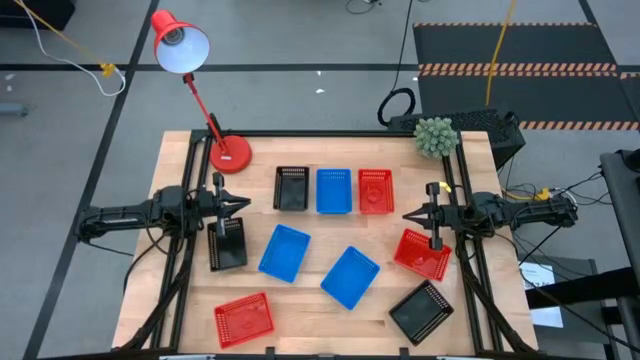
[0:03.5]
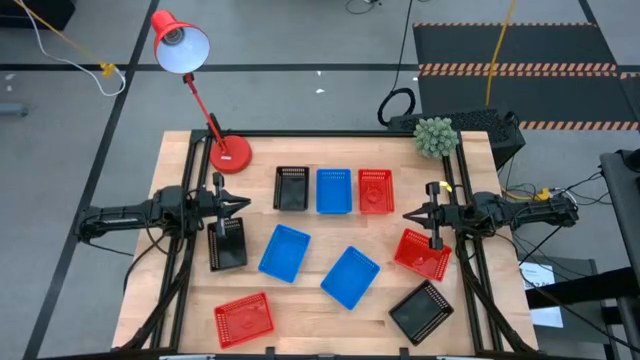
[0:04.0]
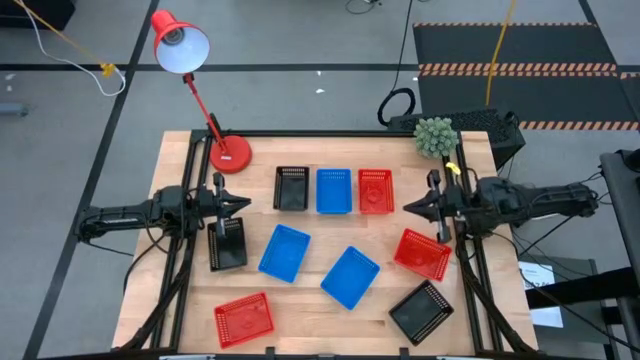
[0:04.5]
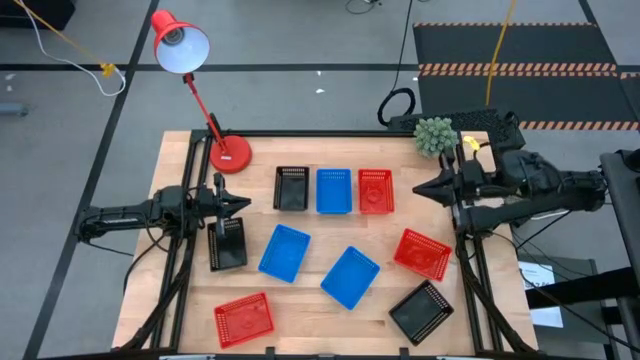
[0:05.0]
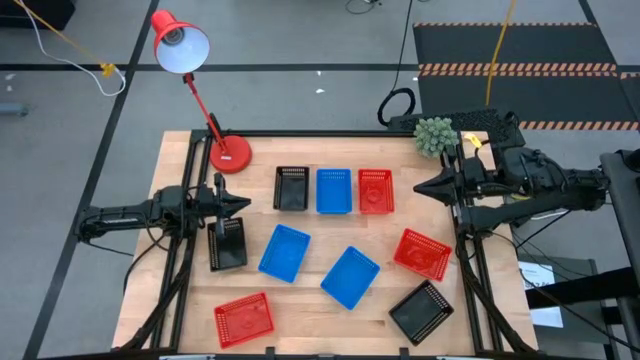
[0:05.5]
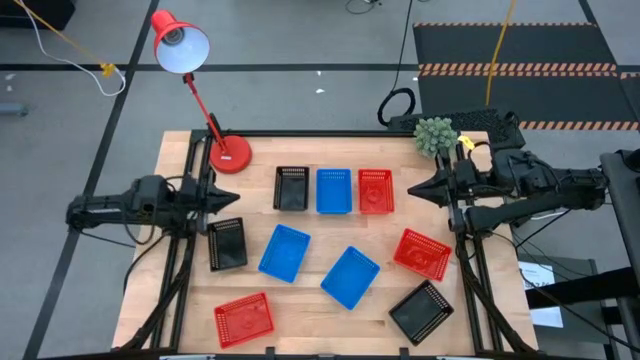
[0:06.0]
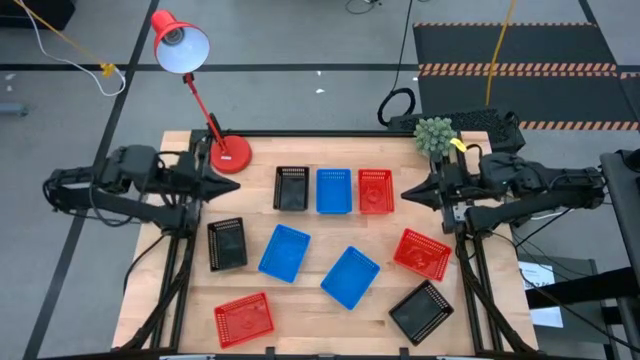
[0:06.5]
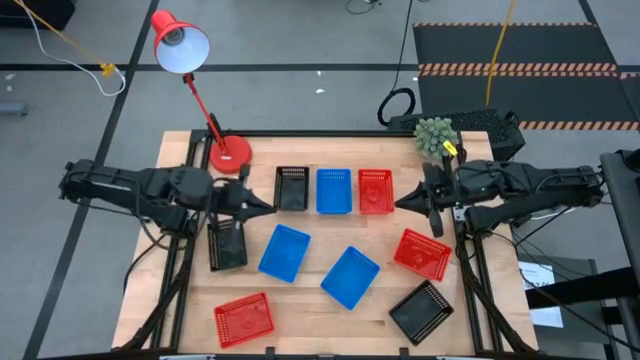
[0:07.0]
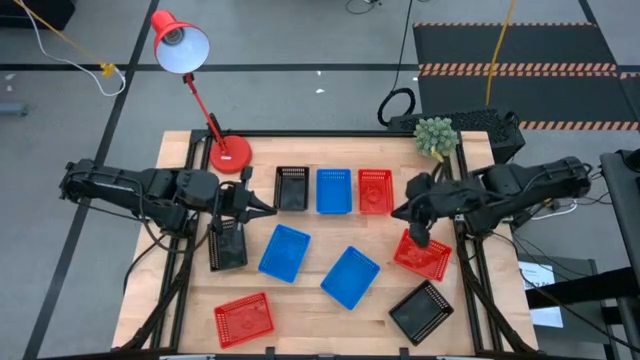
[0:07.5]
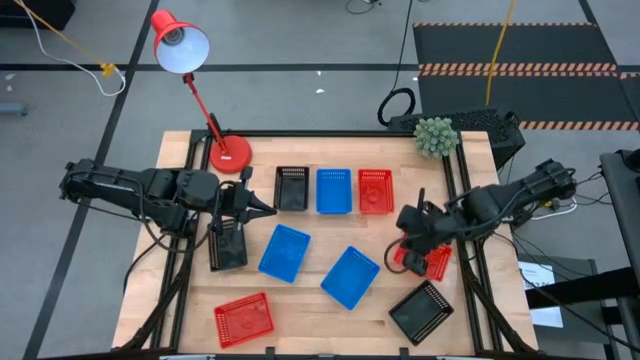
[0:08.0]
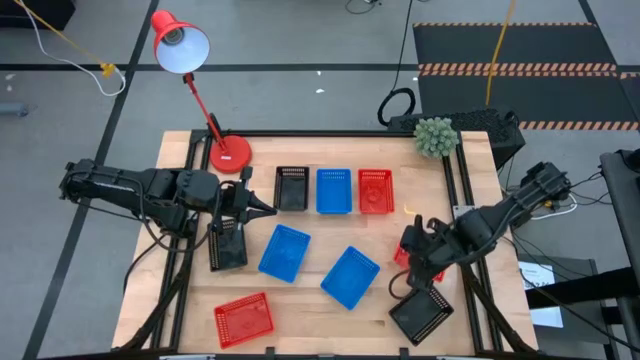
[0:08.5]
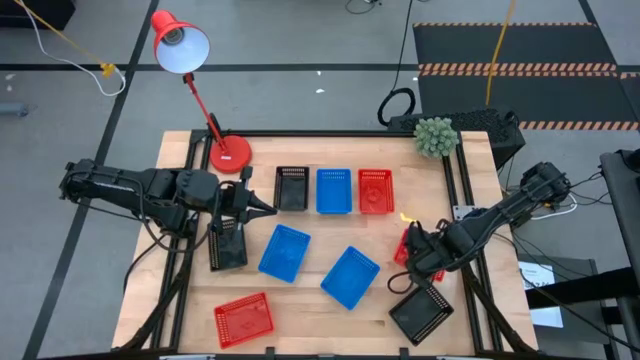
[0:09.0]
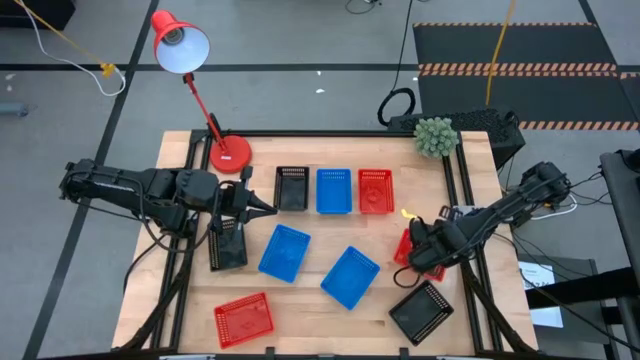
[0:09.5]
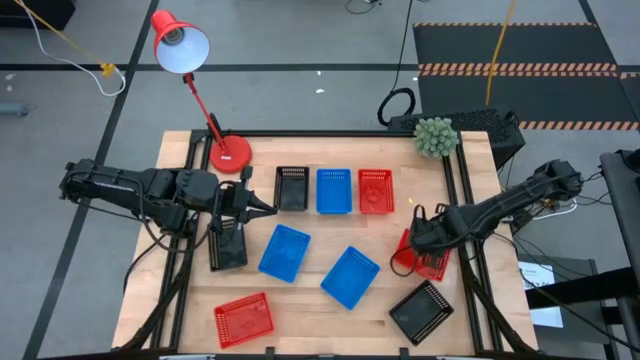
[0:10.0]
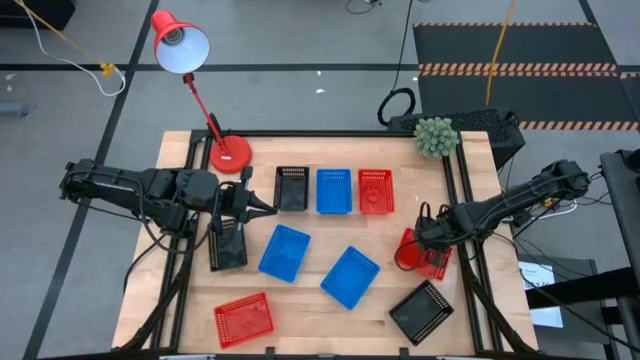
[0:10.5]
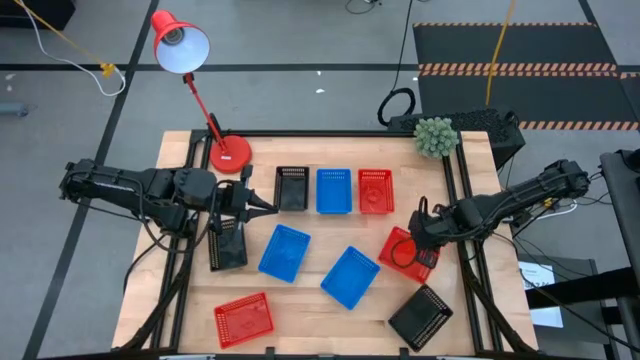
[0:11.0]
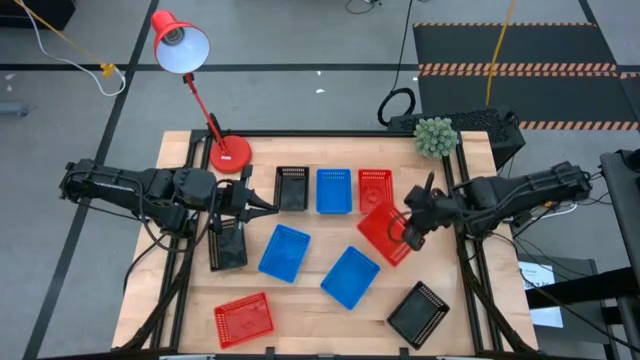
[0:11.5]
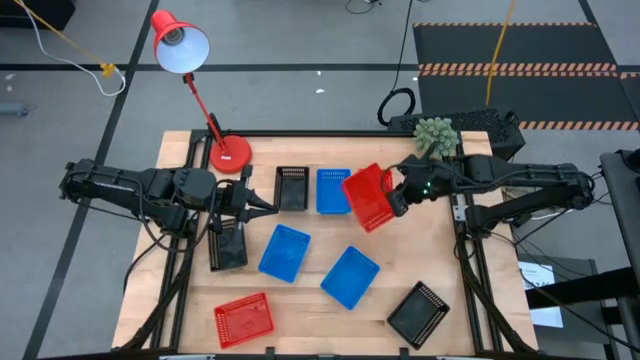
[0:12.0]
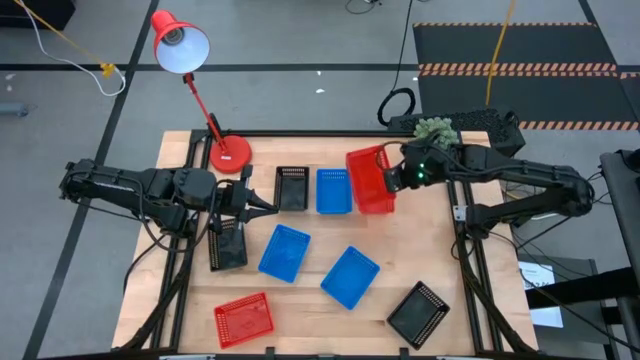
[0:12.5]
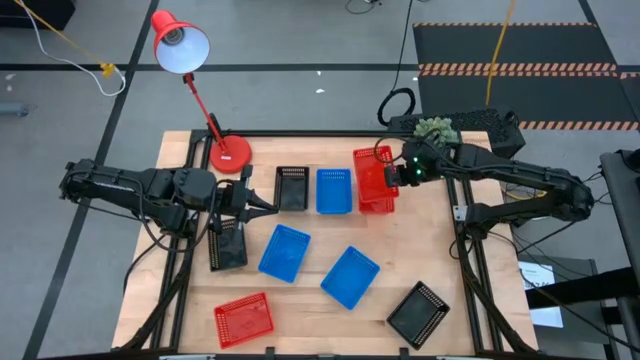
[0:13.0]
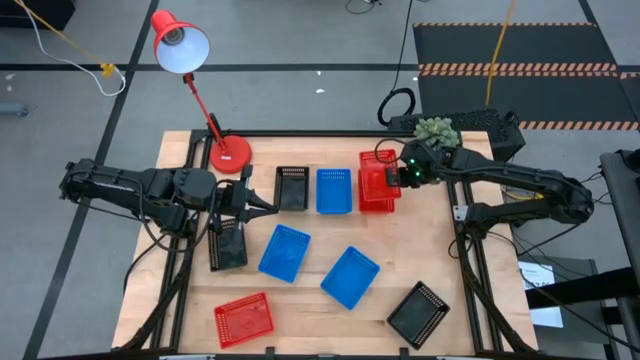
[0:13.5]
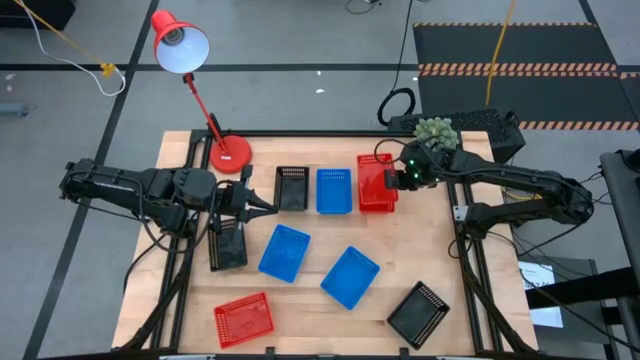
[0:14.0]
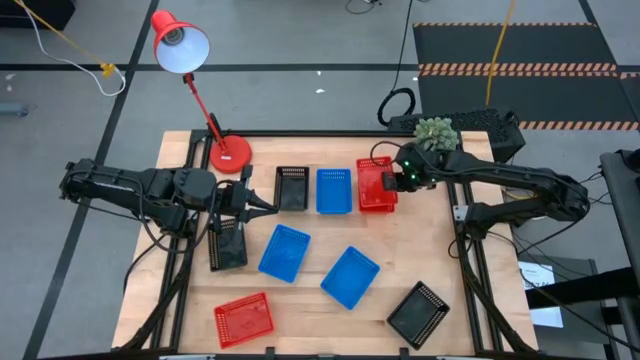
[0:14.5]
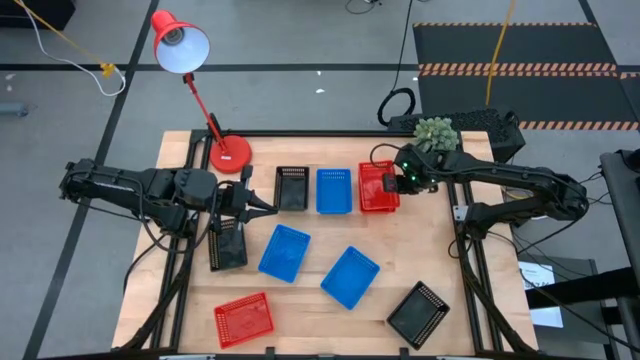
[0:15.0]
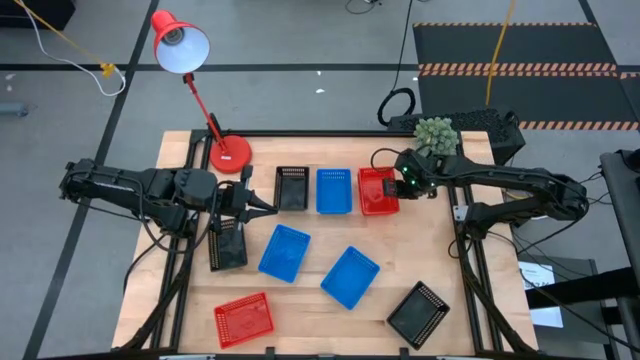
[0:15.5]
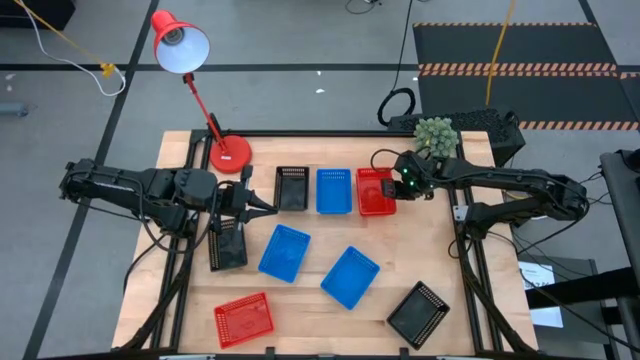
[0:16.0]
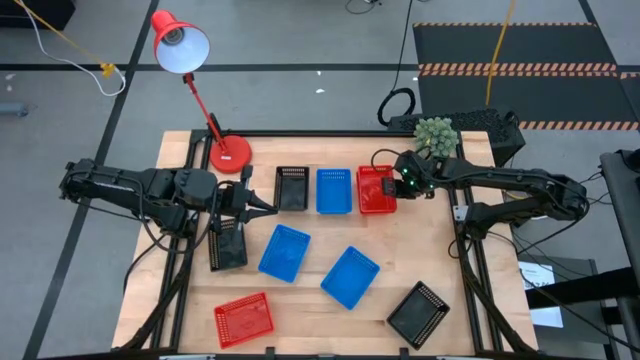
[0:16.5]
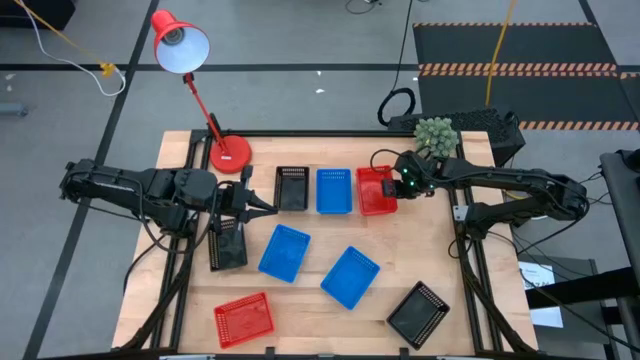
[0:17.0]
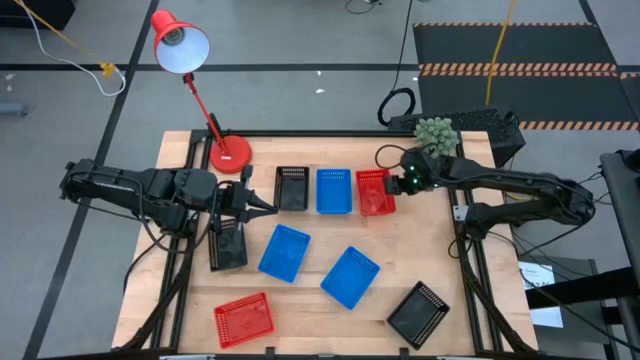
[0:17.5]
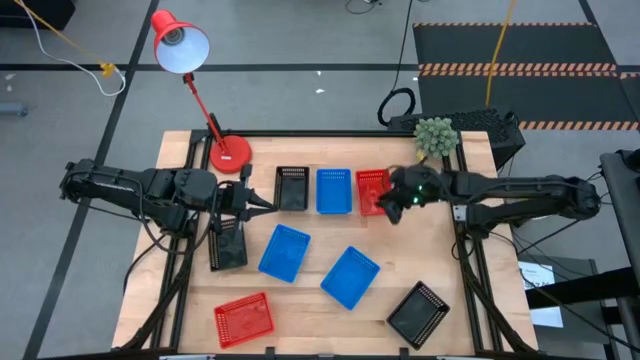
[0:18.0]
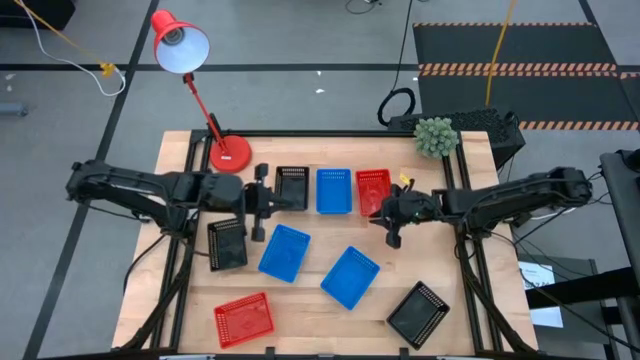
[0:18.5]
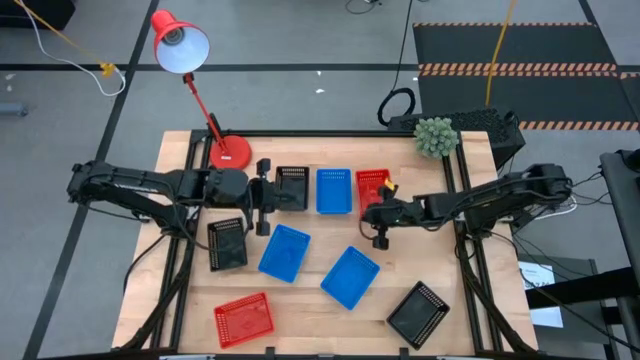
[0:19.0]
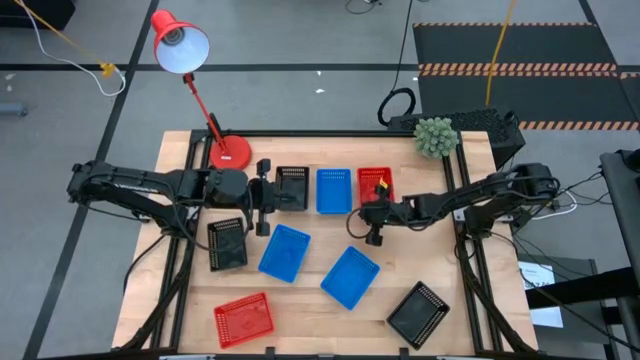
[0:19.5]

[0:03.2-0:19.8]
Stack the middle right red bin on the top red bin

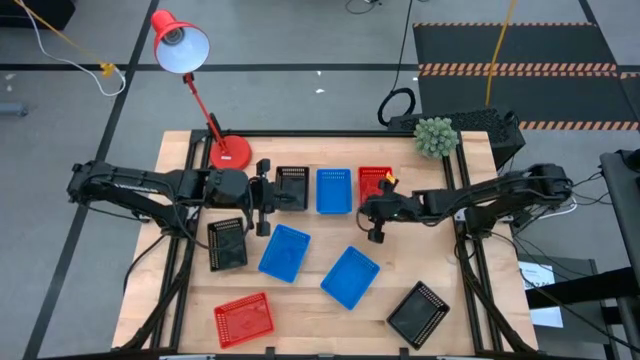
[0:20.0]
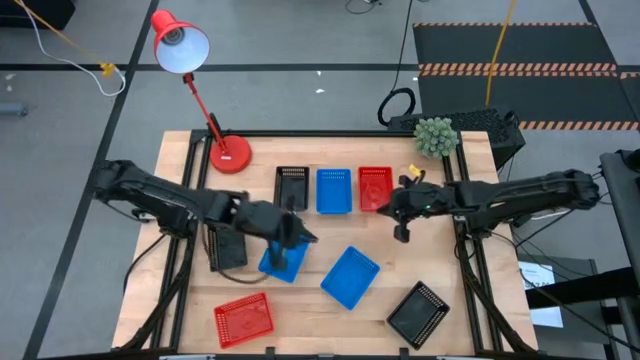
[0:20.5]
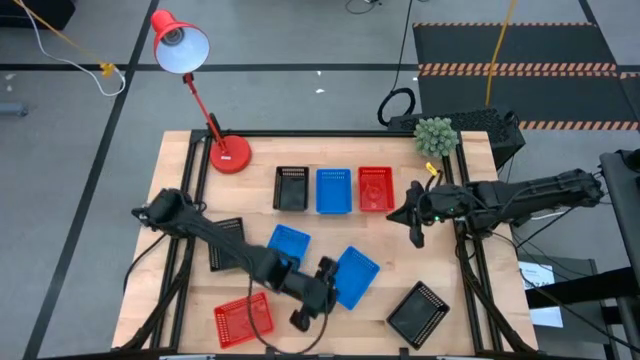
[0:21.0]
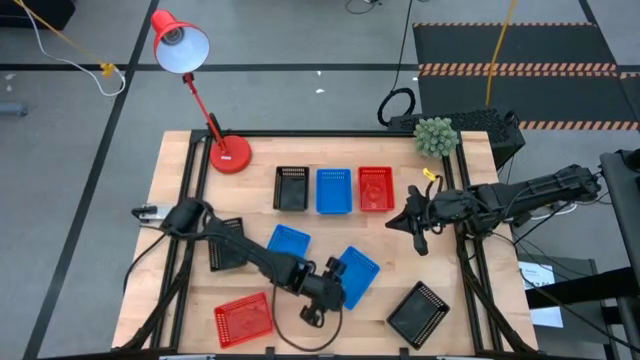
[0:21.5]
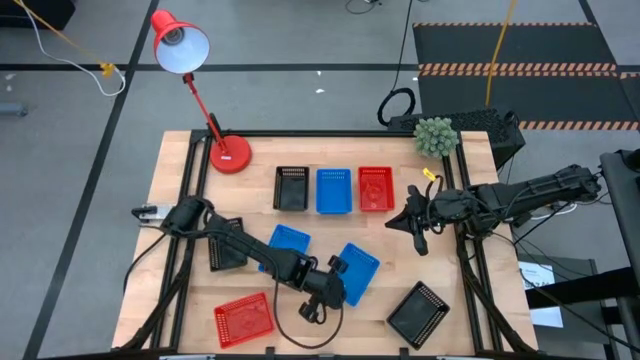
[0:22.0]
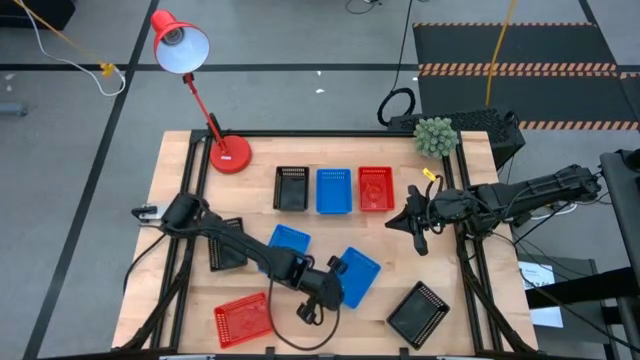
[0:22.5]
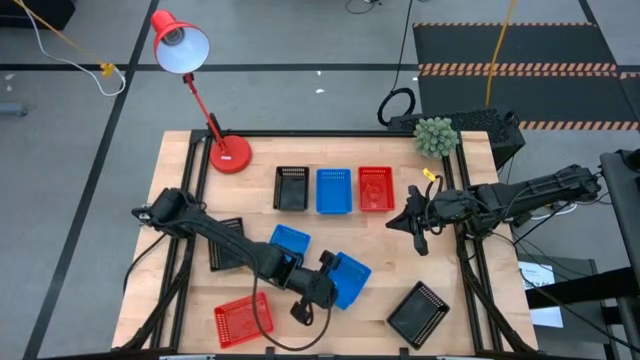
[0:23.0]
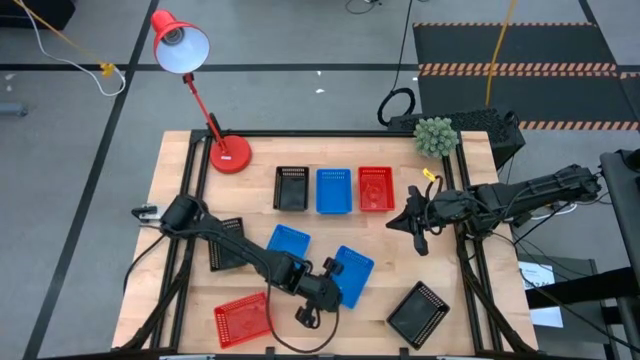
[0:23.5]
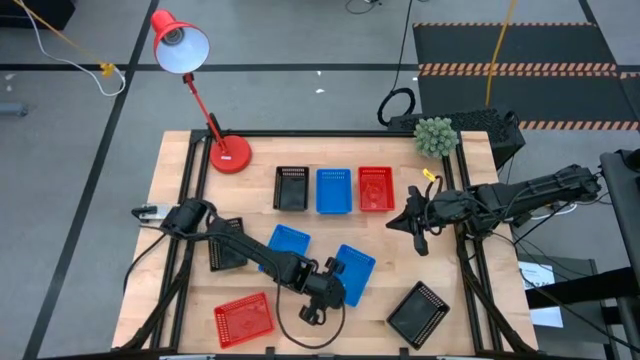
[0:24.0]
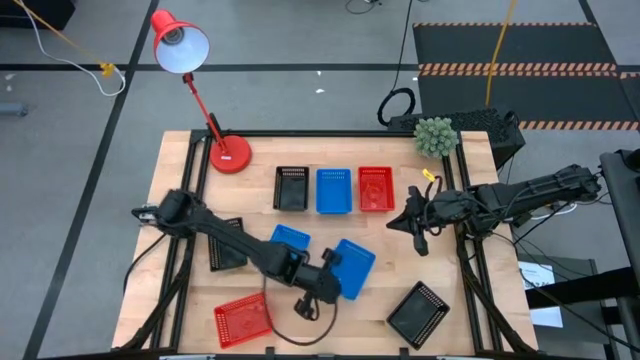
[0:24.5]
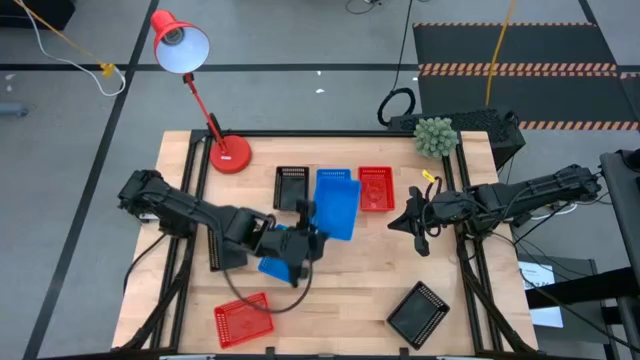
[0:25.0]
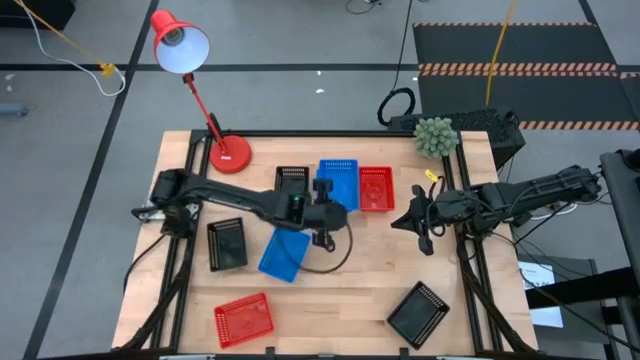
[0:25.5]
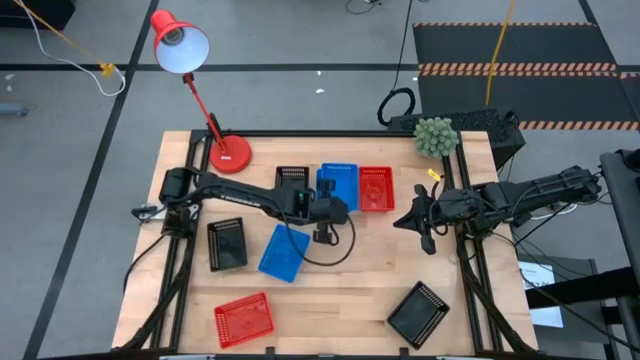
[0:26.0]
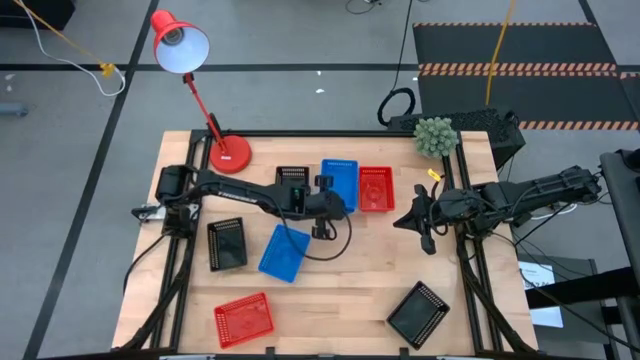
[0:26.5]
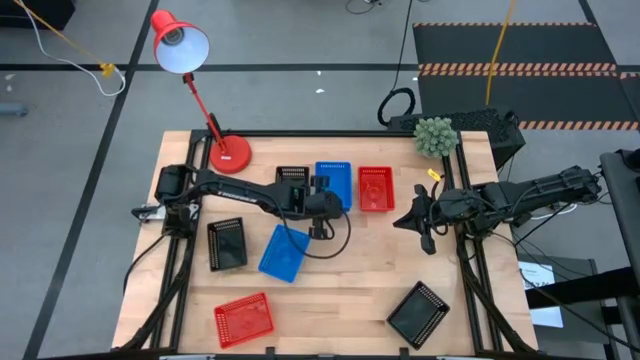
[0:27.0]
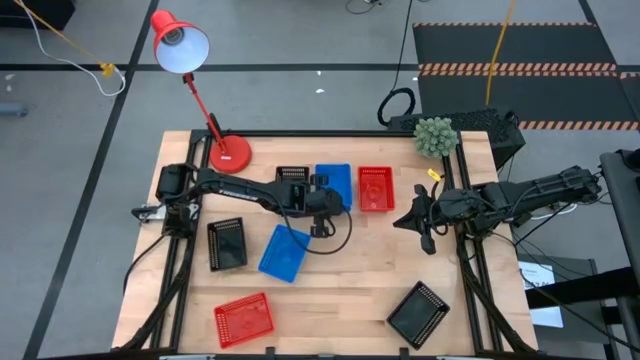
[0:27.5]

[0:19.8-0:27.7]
Stack the bottom blue bin on the top blue bin
